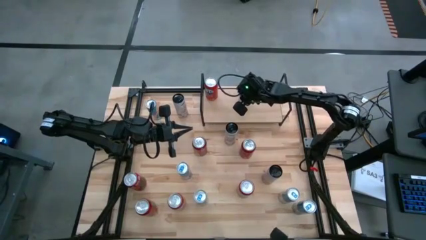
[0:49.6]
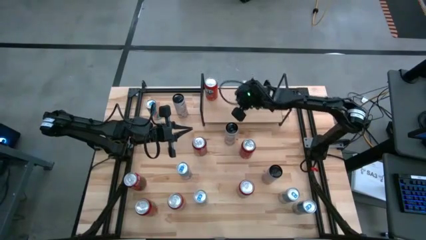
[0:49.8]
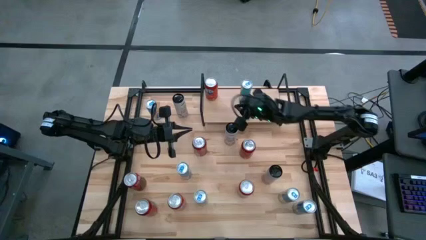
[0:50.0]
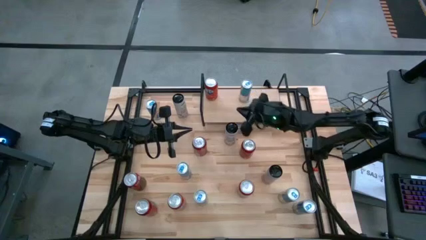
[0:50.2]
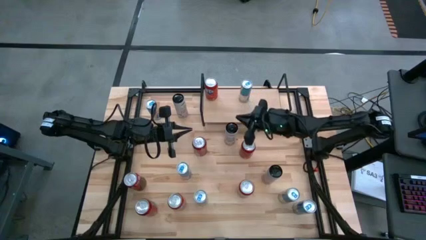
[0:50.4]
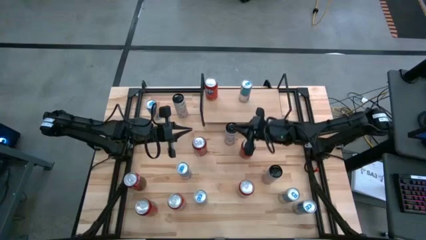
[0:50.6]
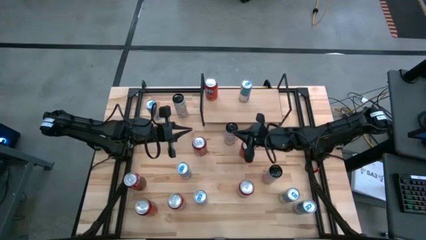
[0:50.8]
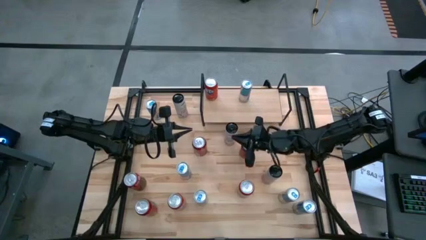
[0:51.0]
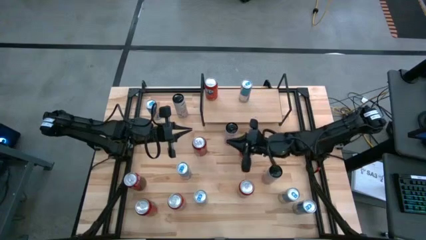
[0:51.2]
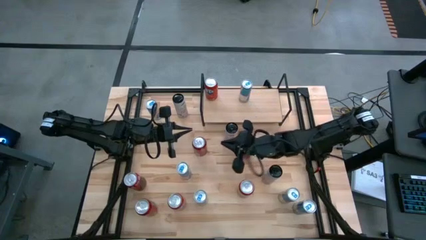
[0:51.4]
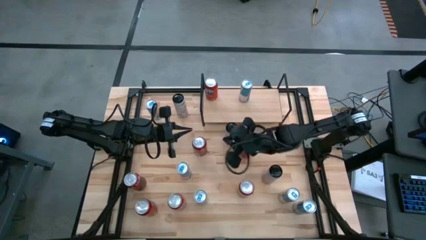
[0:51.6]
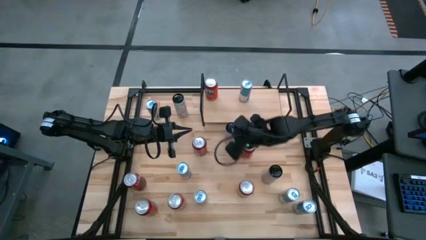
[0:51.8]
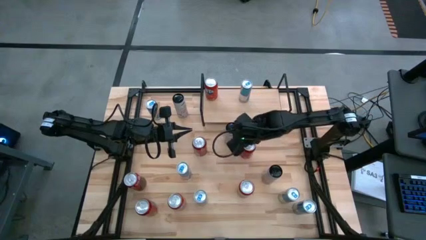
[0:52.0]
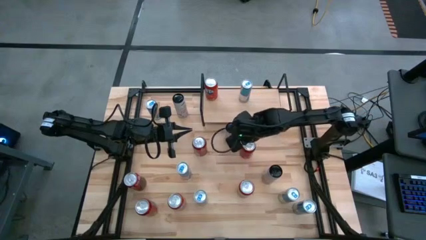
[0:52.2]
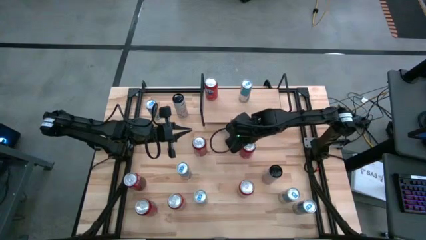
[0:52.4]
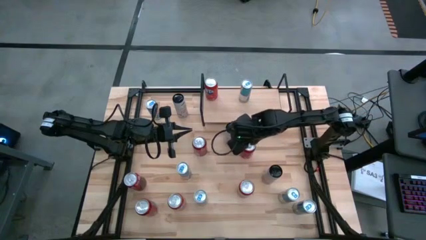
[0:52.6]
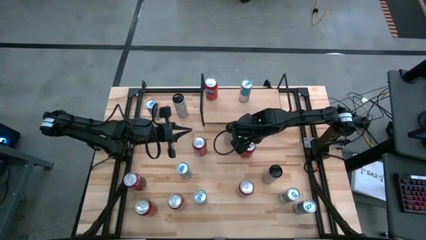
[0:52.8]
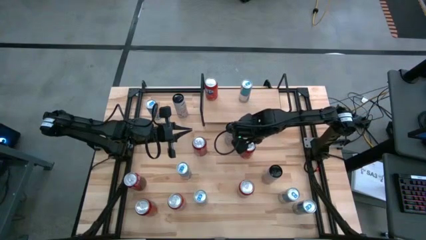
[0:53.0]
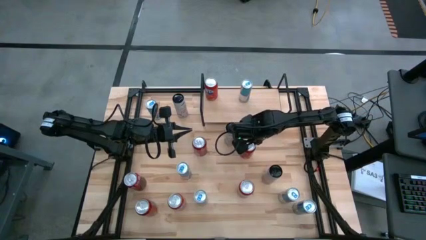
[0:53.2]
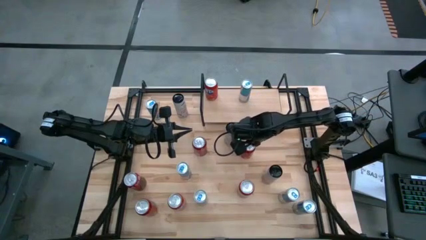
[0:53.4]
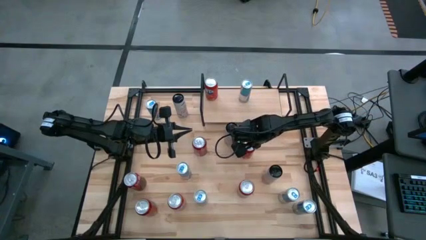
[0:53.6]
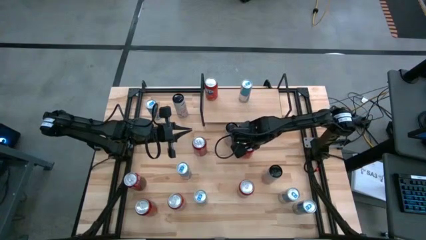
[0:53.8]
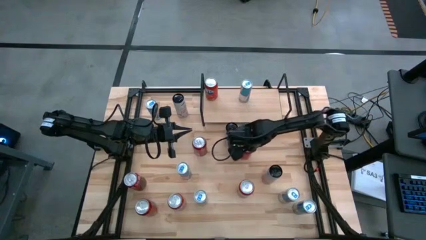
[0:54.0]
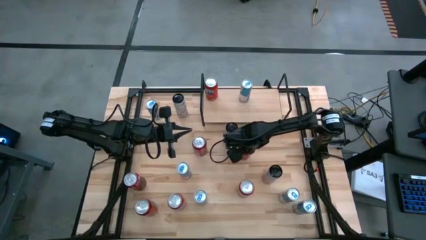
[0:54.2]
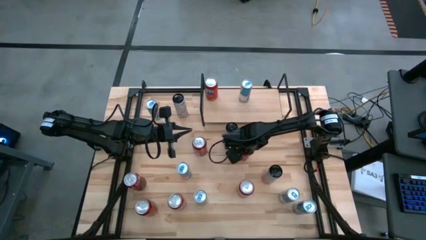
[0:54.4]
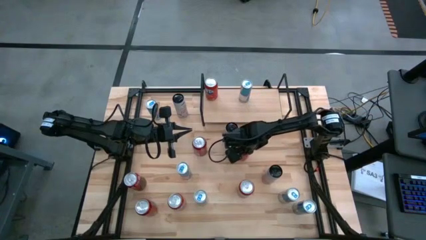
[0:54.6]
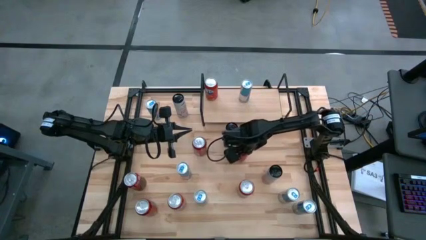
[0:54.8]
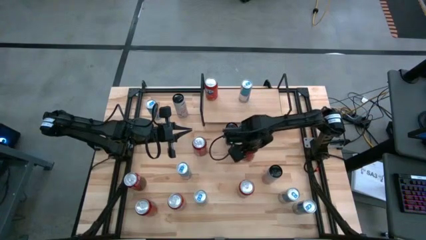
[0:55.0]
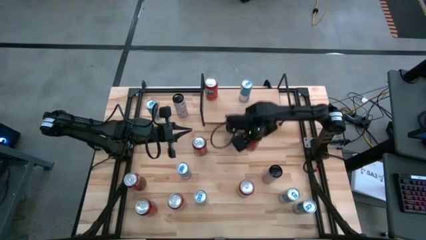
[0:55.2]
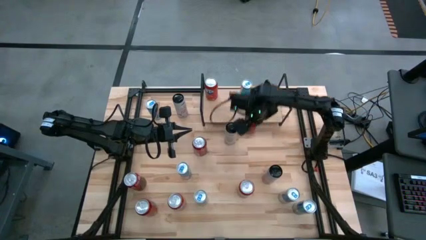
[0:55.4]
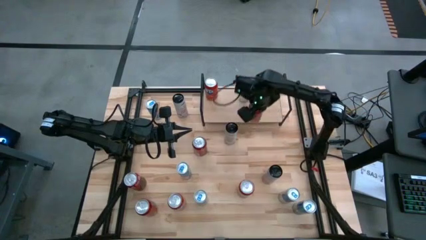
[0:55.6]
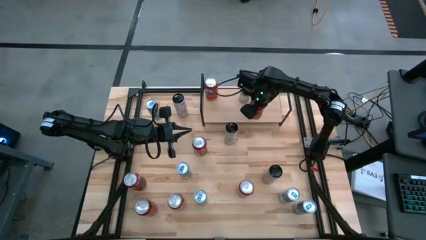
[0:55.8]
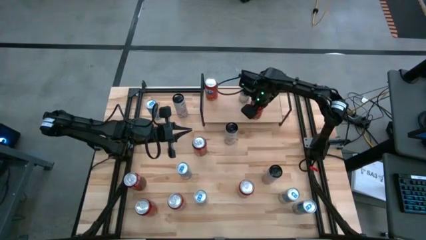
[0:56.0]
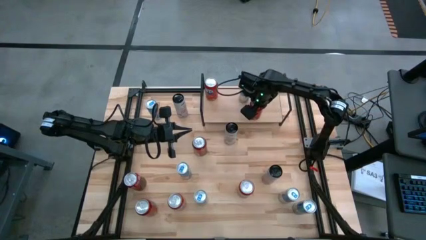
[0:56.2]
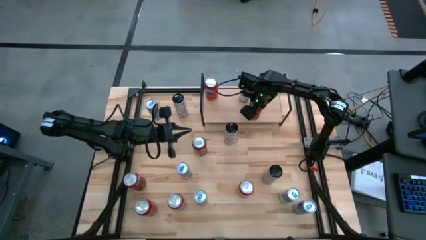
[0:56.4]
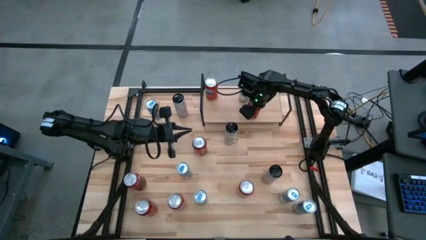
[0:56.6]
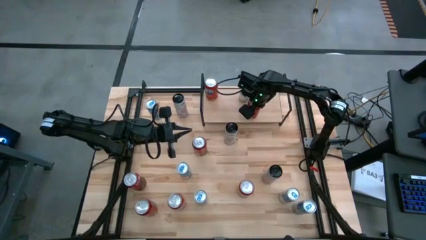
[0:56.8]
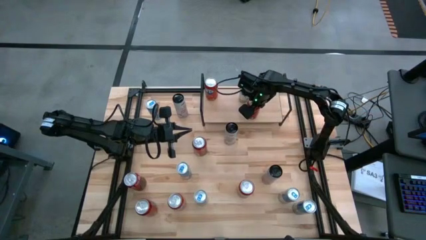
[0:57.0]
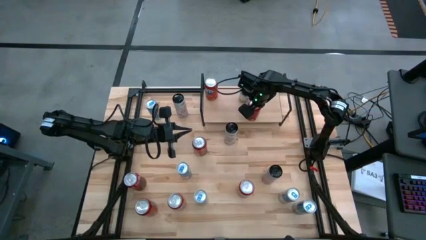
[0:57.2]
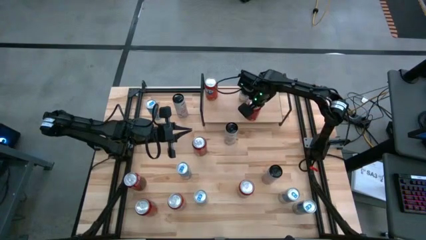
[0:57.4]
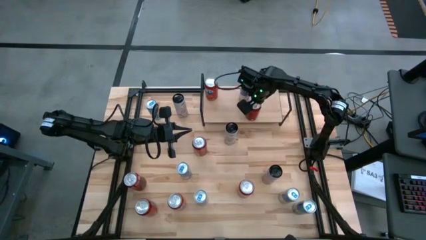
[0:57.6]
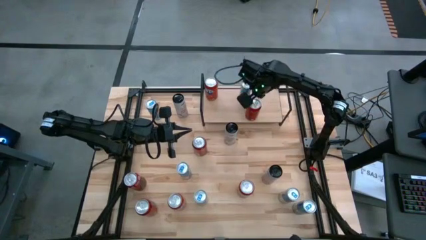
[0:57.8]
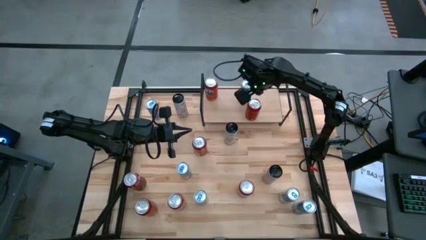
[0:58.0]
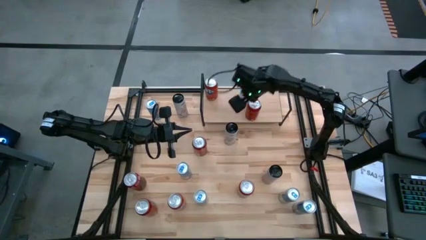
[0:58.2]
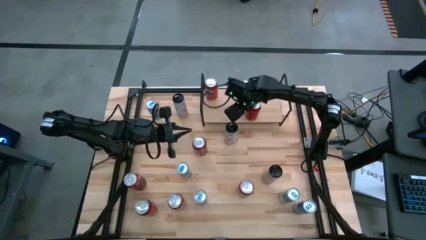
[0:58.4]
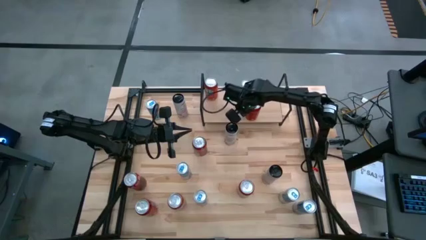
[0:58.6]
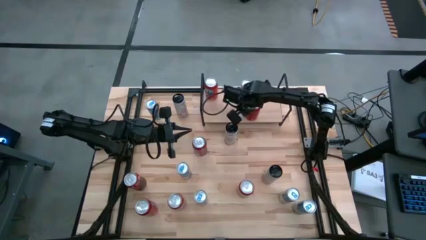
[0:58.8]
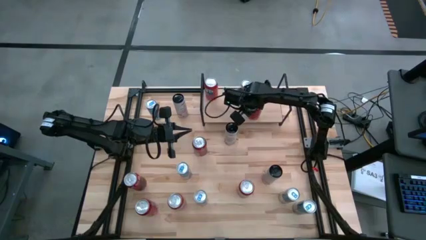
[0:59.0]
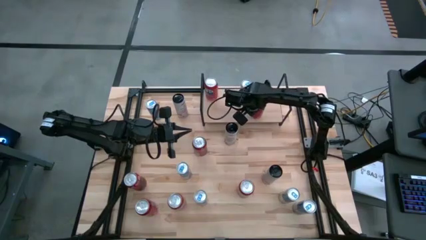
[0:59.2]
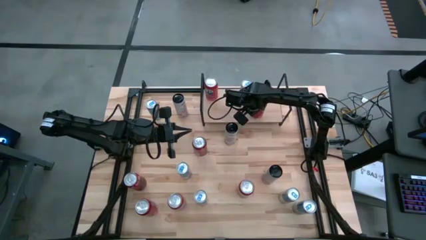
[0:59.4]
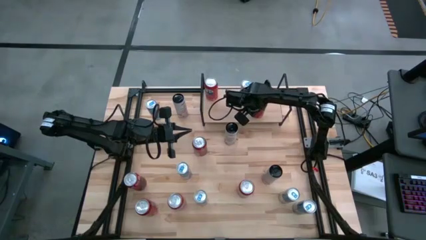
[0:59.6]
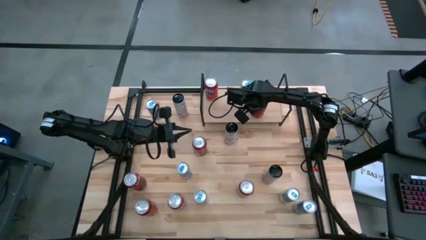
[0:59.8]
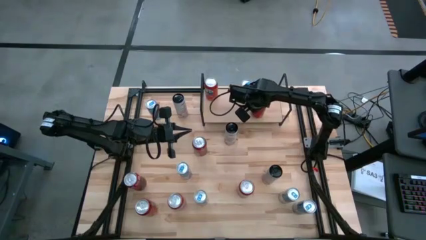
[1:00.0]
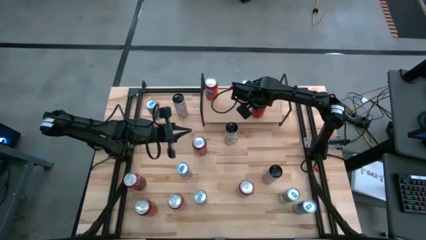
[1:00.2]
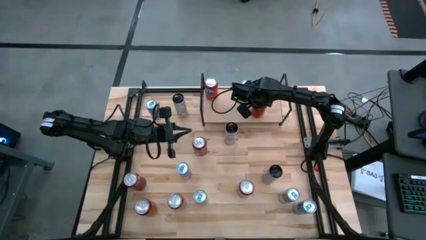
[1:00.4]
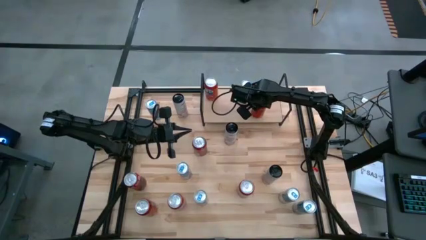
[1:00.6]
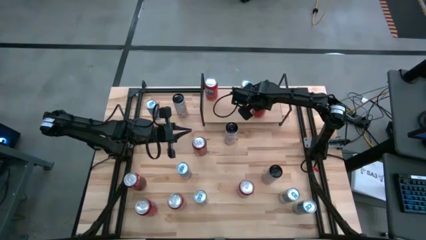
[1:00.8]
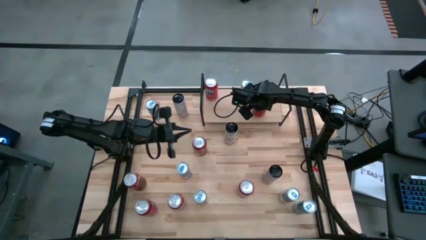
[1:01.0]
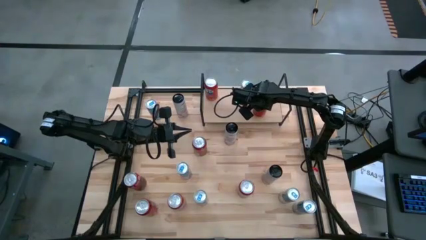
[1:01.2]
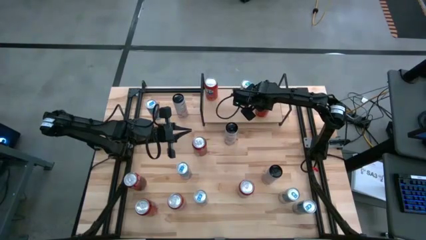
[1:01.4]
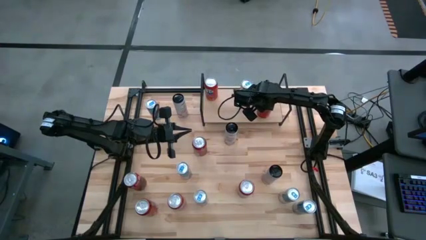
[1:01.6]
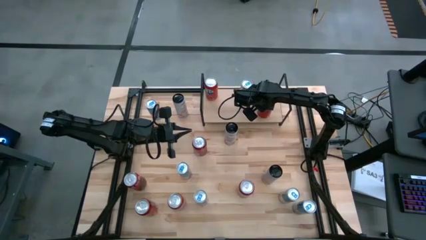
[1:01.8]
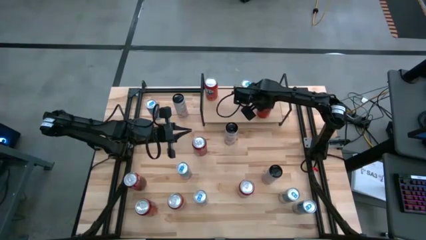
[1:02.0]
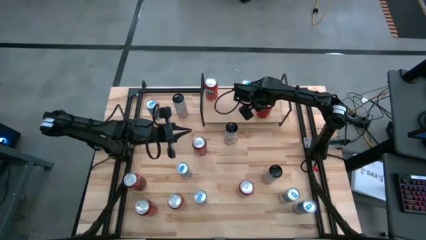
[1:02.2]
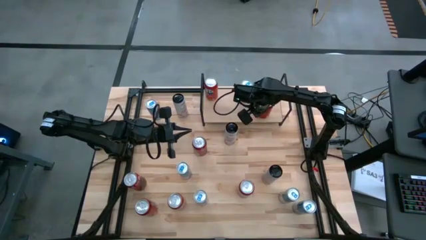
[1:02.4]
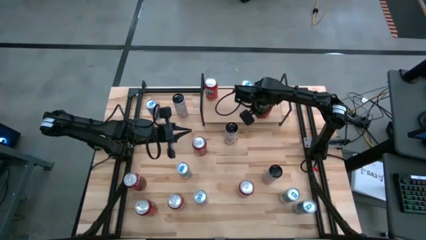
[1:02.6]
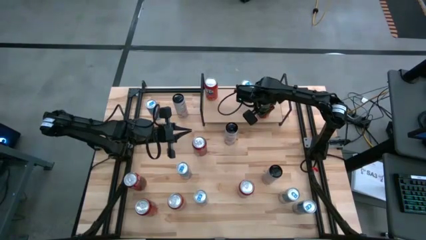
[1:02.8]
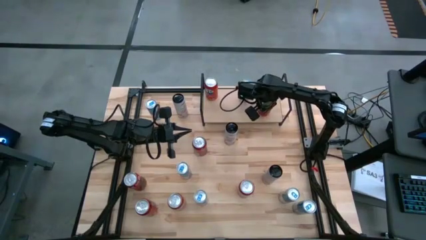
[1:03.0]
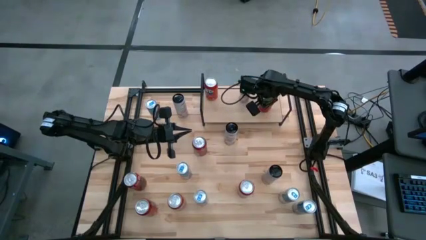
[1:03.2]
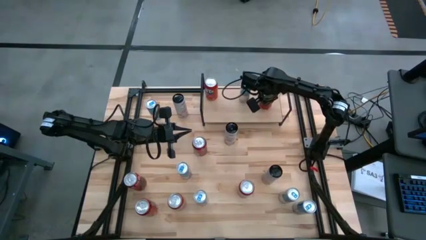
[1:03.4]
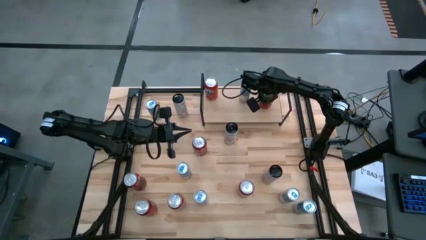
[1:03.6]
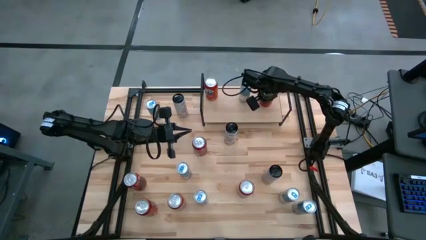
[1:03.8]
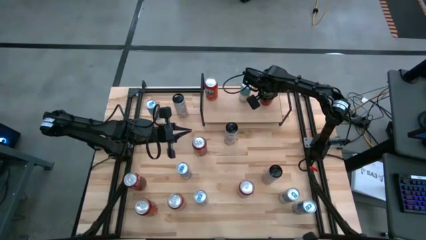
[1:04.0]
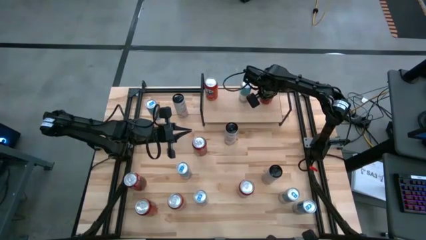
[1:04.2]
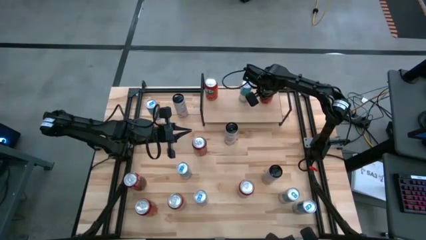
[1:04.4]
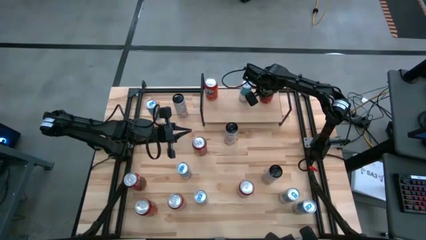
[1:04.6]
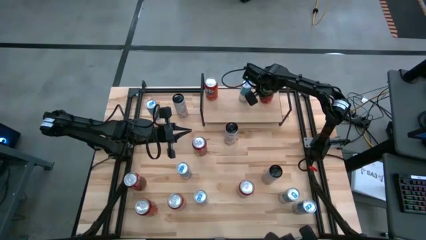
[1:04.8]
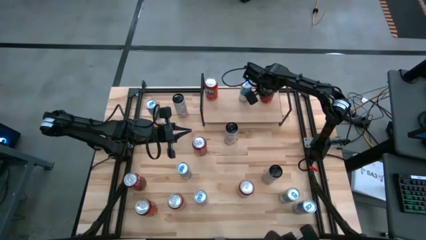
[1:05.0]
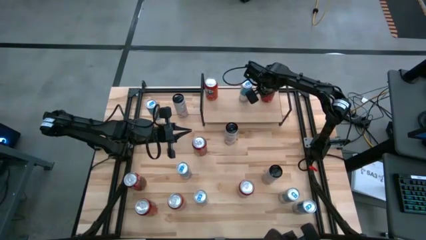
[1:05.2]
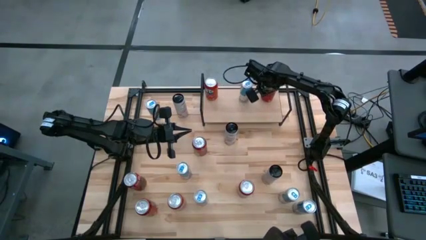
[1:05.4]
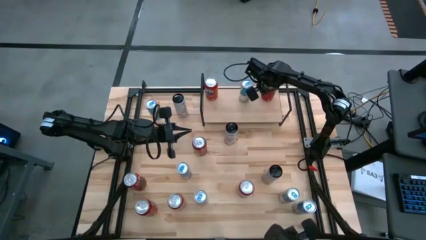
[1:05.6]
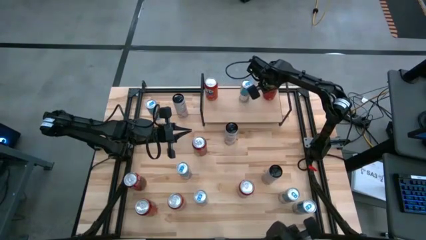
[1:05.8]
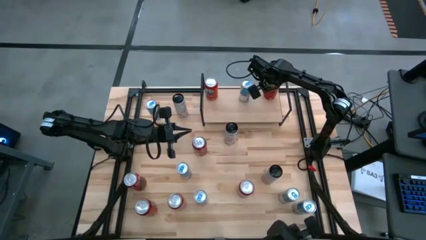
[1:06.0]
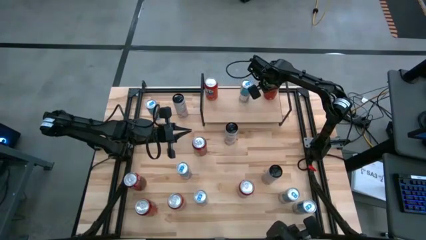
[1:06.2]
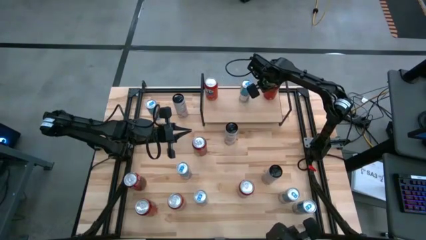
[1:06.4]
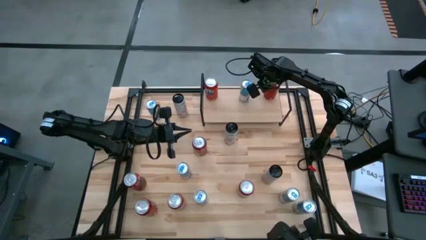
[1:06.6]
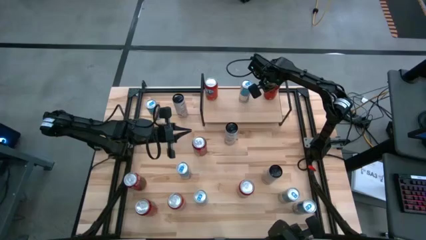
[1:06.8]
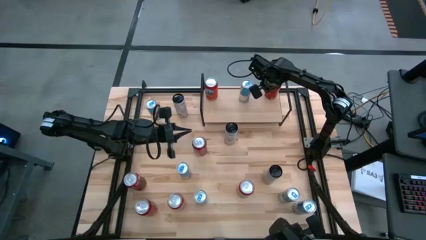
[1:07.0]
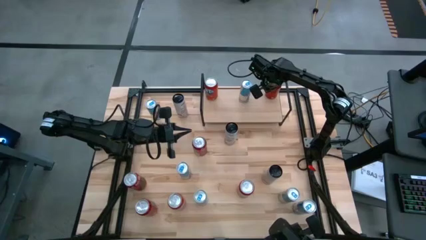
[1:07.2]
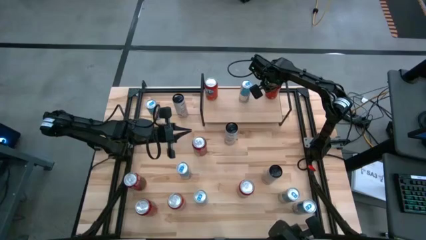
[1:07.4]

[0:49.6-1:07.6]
Task: Place canned beverage on shelf
Put the dark red soda can on the shelf
